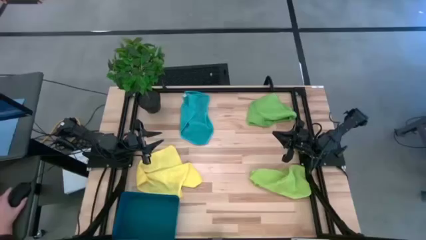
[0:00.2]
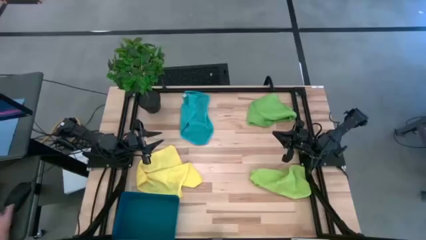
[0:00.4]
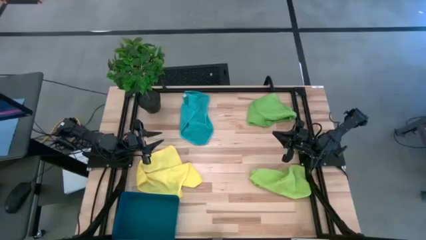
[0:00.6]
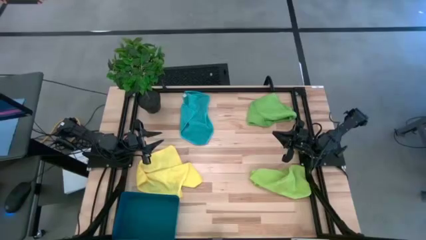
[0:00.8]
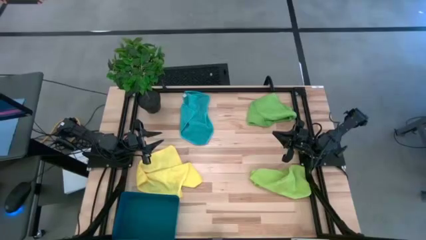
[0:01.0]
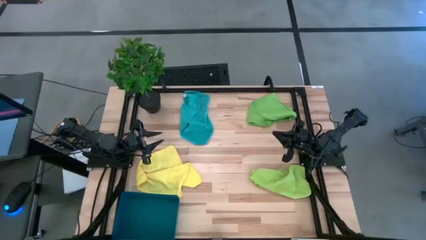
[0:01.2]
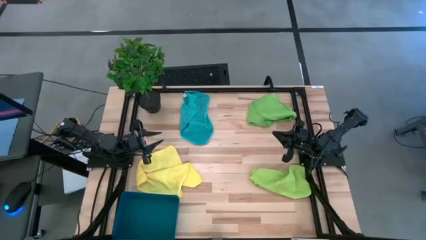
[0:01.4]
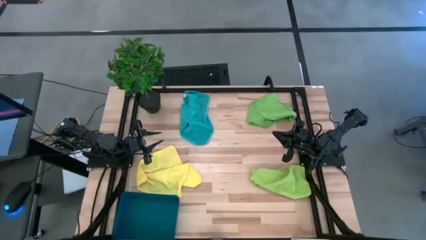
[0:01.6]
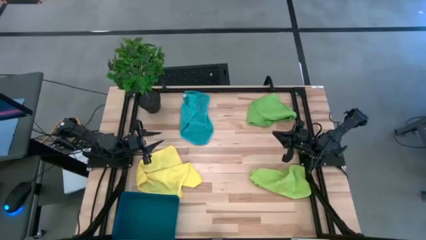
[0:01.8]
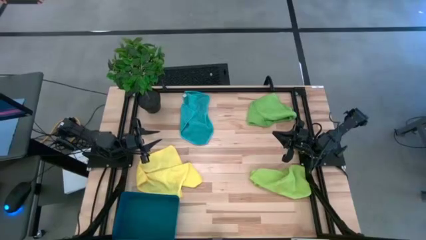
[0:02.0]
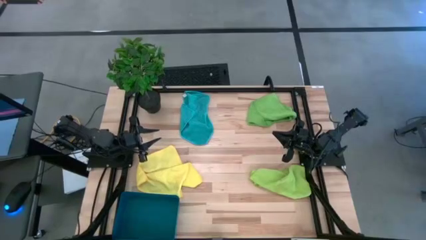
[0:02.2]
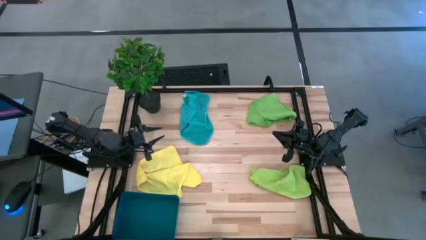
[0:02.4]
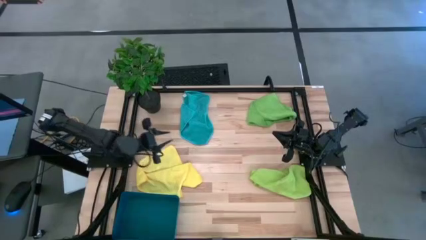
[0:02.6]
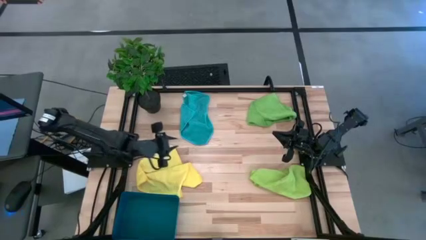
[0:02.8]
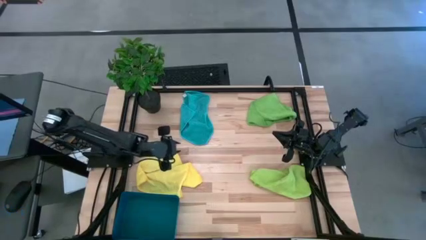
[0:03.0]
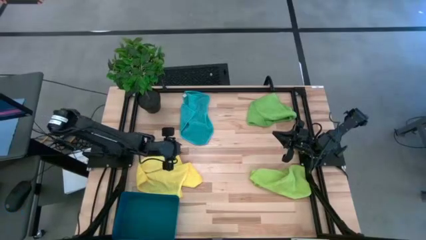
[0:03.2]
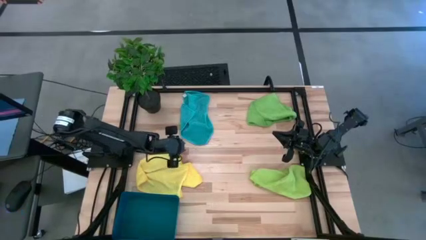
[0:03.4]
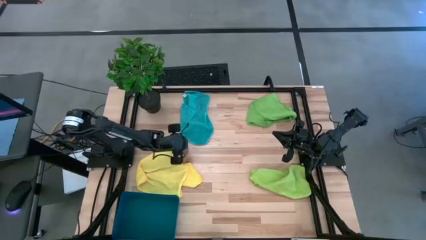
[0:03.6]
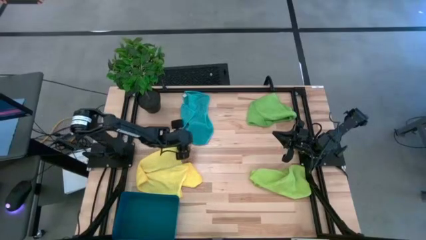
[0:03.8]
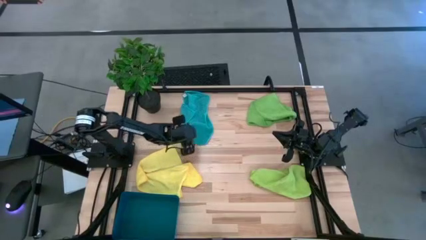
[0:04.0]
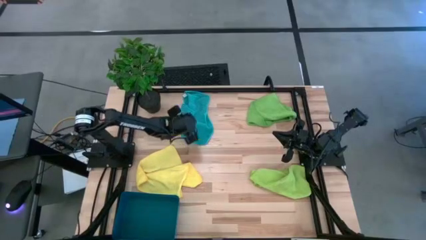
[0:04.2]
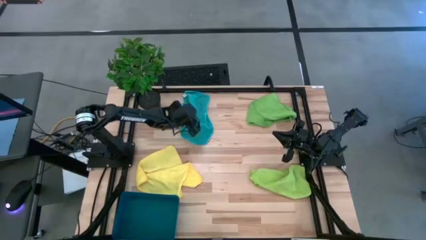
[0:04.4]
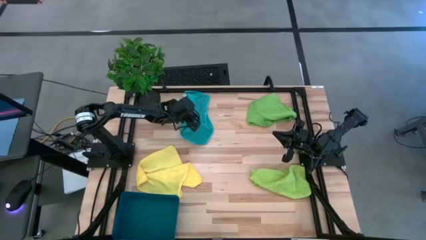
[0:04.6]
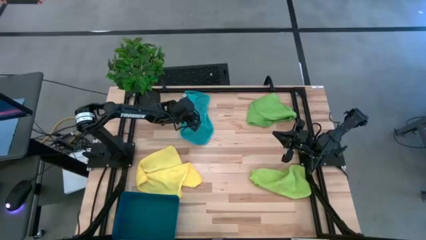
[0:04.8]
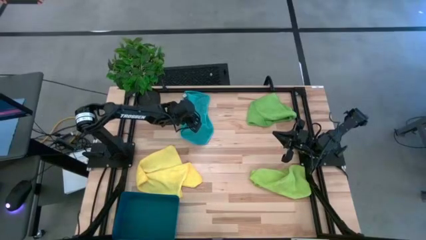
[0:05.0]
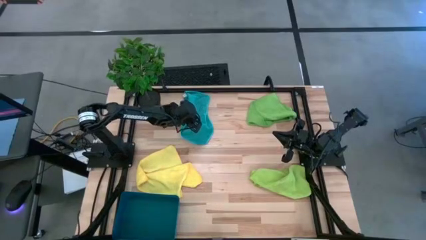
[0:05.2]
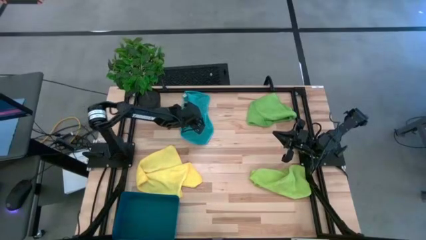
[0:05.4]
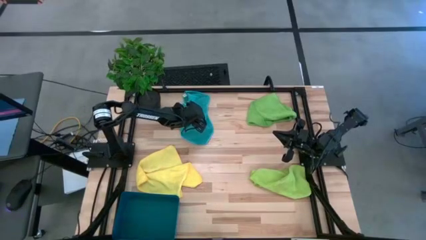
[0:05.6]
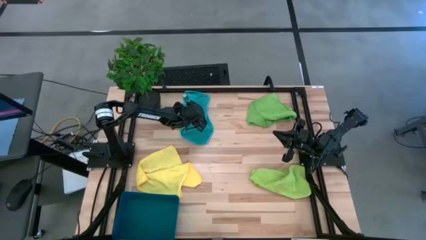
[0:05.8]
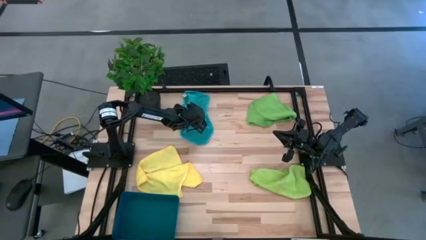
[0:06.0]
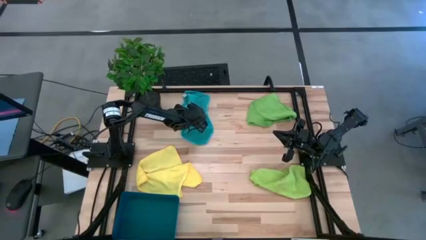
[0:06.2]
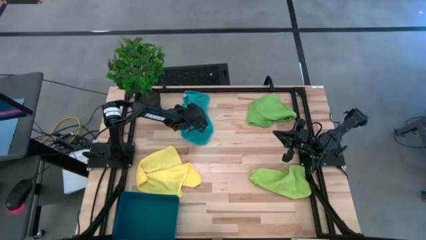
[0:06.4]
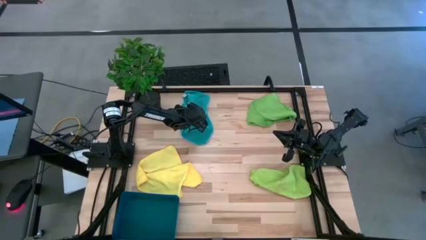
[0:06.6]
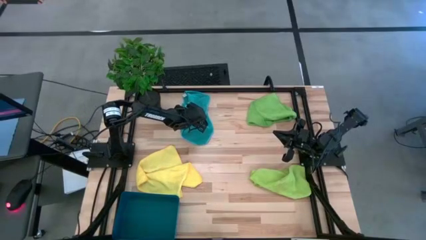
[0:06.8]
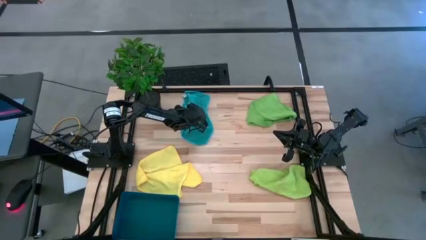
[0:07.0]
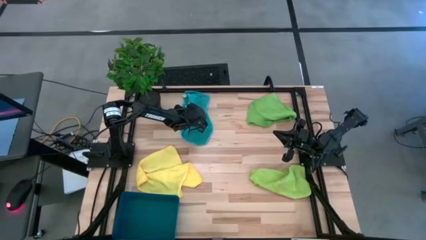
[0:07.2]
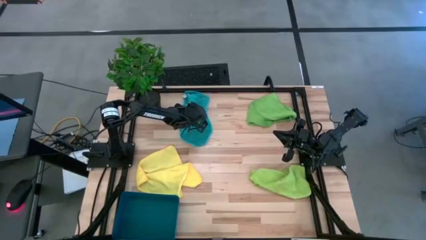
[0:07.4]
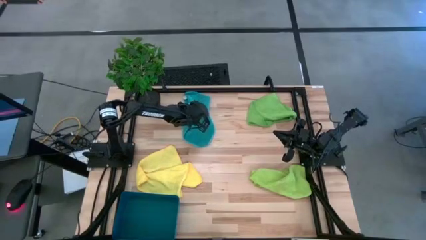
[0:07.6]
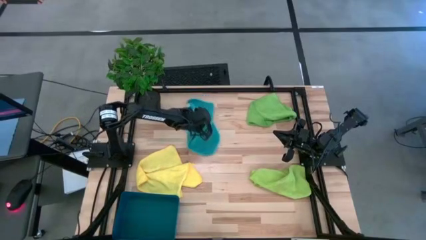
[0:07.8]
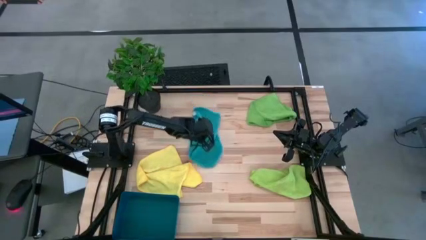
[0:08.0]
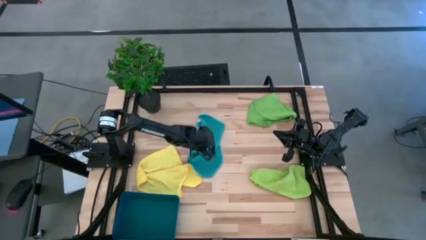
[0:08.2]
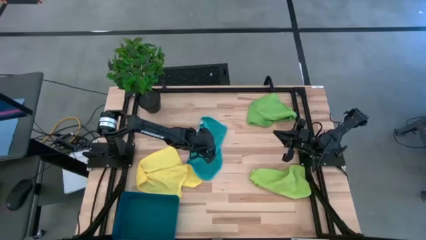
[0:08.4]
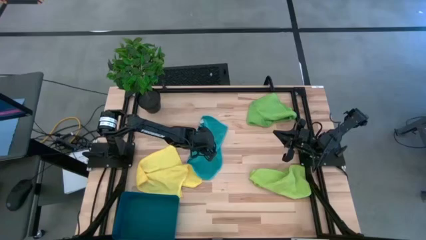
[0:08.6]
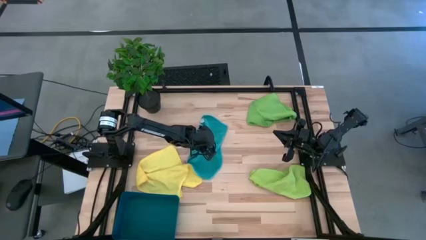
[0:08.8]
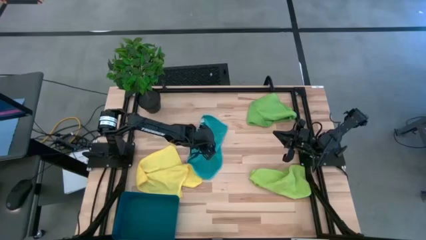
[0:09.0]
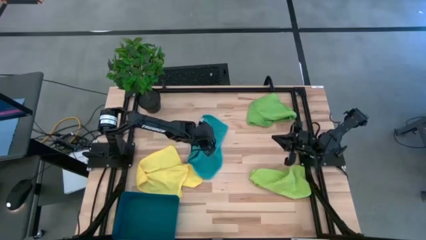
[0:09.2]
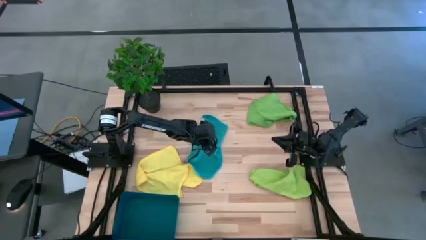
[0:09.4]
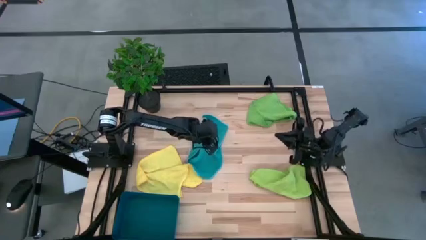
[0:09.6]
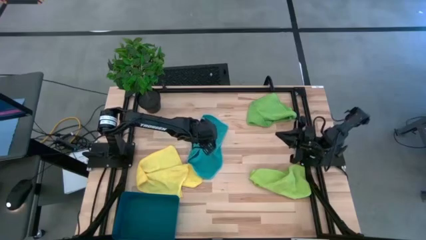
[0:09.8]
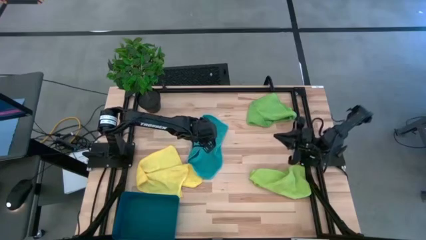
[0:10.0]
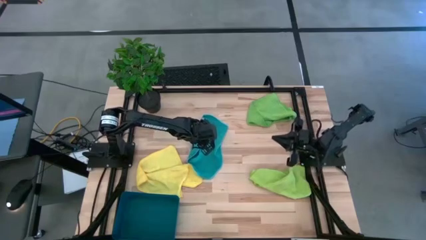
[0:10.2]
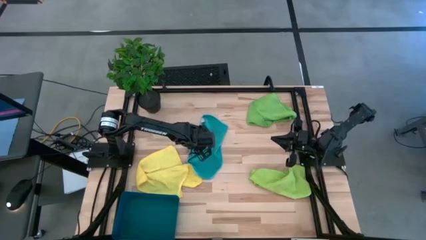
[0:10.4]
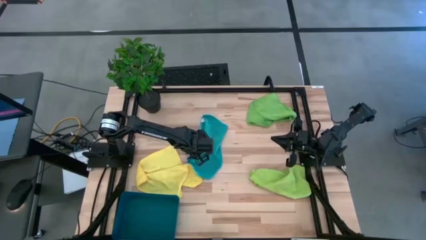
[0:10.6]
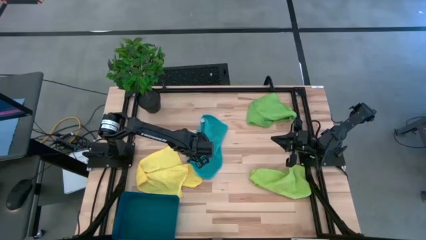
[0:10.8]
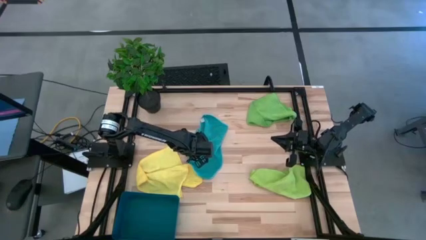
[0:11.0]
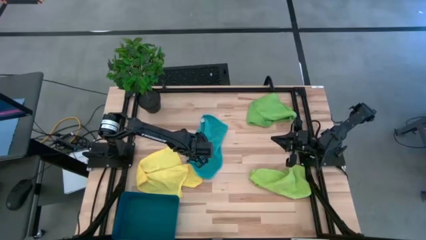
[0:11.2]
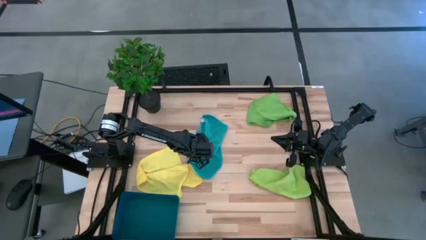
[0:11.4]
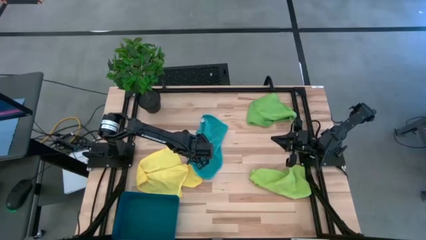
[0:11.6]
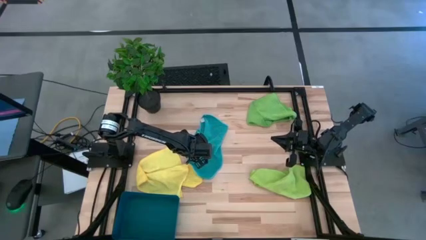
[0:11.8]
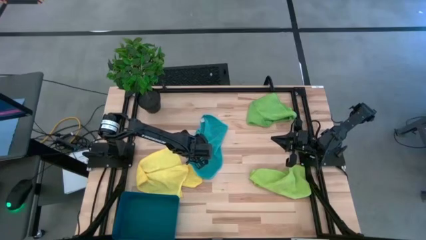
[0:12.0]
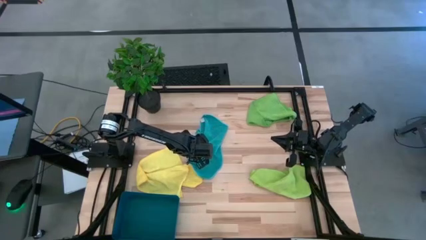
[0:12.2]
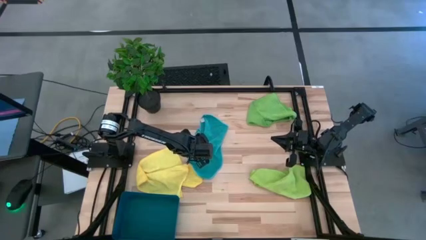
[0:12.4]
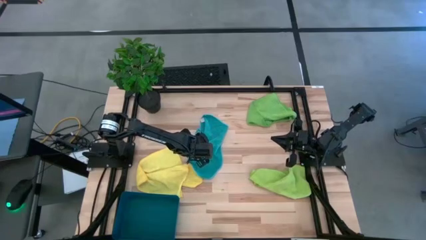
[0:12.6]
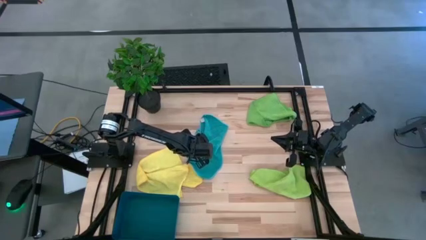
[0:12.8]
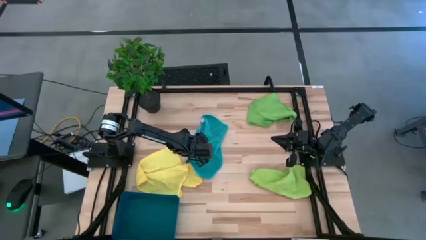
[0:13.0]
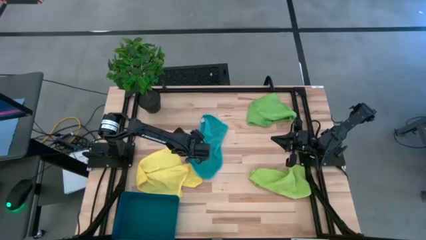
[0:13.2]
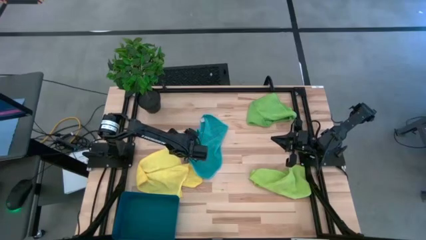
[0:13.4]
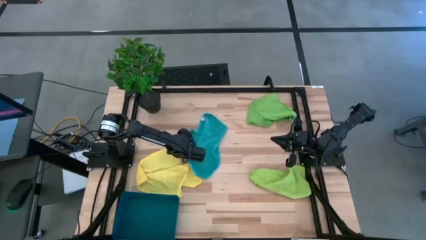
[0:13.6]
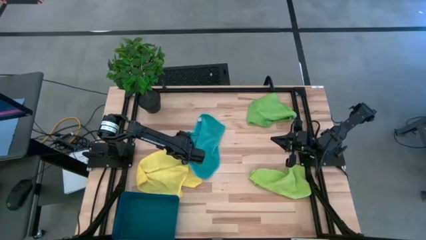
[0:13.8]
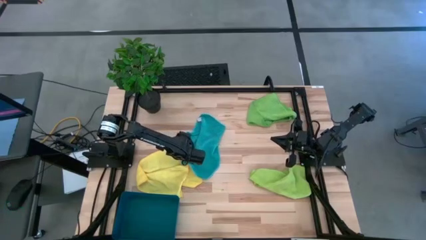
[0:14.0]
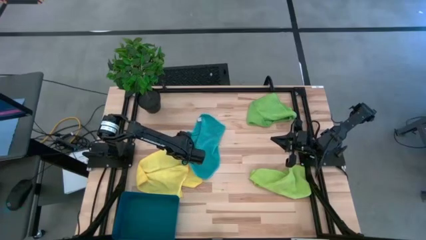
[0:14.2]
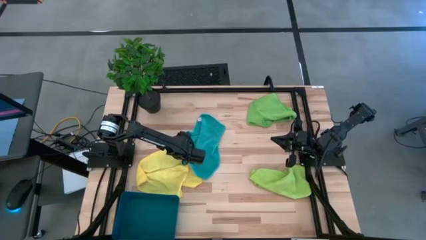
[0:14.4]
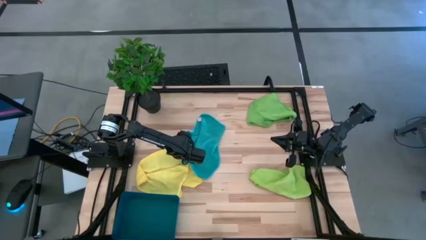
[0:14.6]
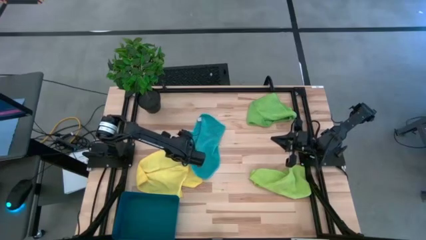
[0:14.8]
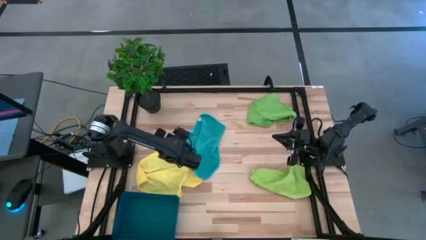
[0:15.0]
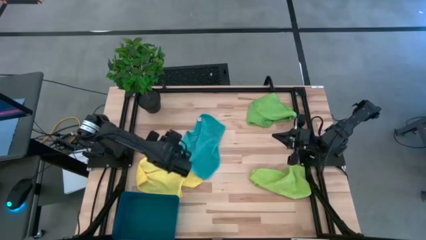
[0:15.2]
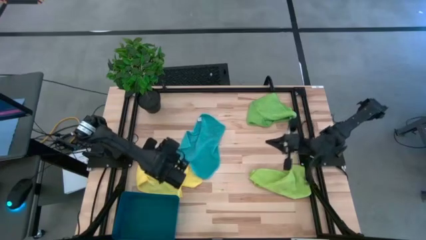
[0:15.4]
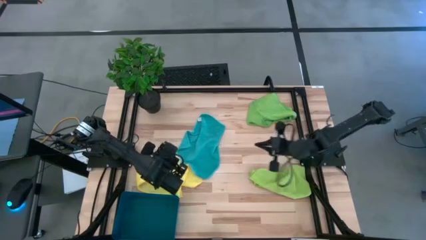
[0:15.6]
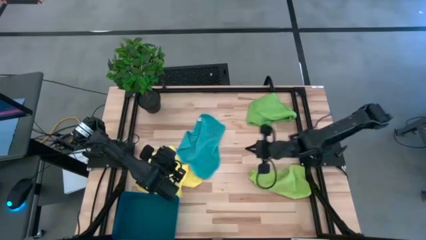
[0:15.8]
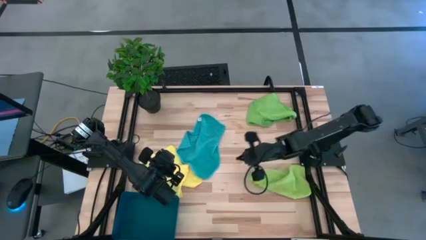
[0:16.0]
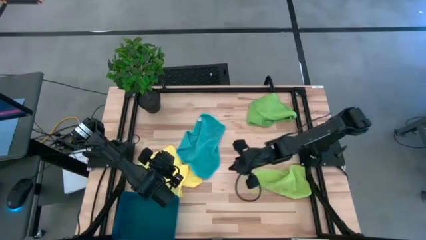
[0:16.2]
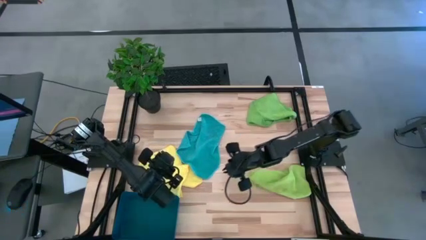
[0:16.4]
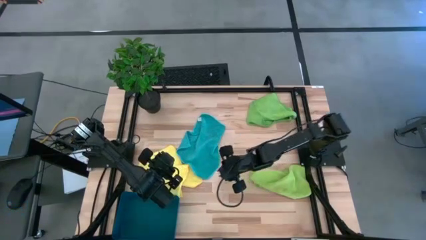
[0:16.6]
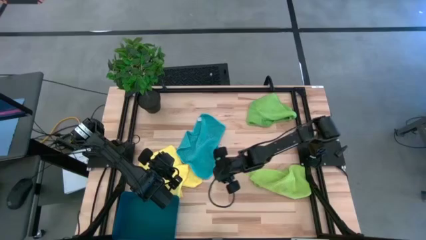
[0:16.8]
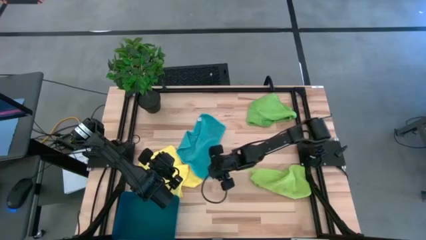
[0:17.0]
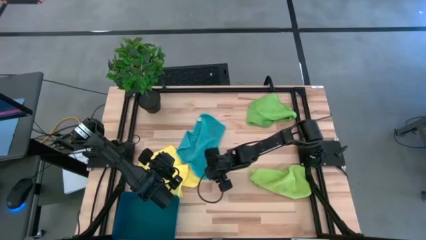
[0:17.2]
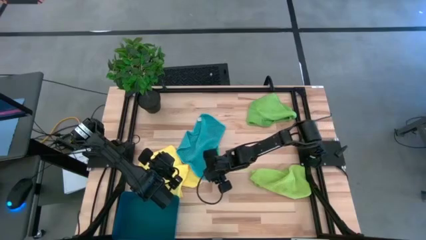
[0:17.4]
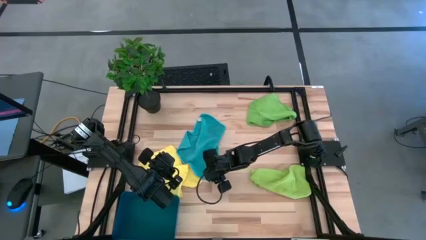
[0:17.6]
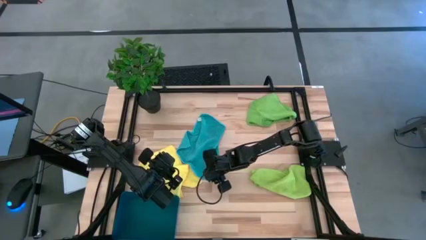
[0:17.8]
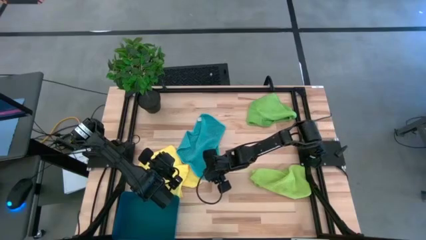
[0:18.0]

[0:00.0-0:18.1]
Task: Fold microfiber towels
Fold the blue microfiber towel
